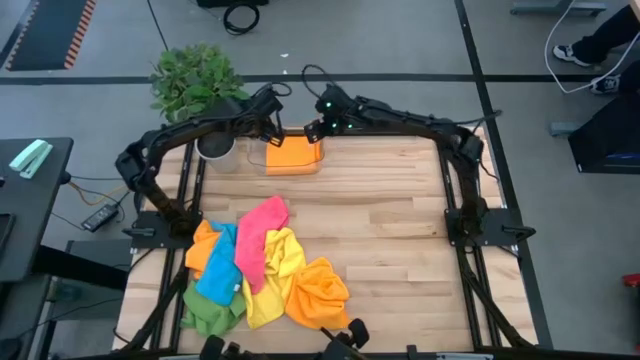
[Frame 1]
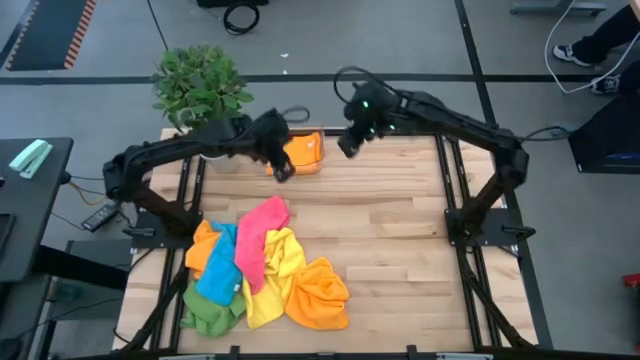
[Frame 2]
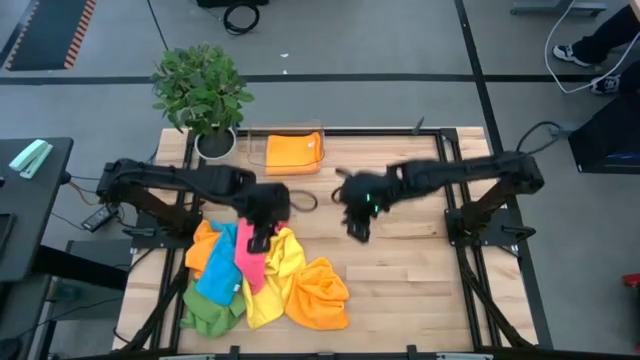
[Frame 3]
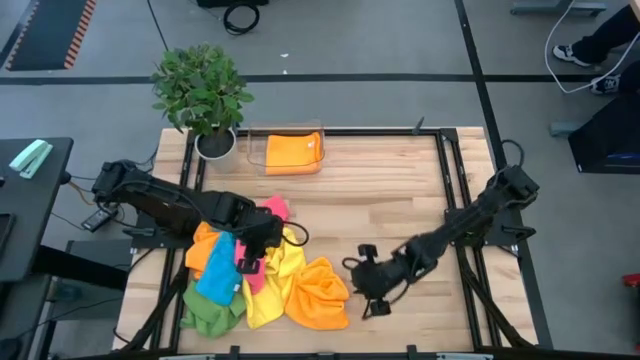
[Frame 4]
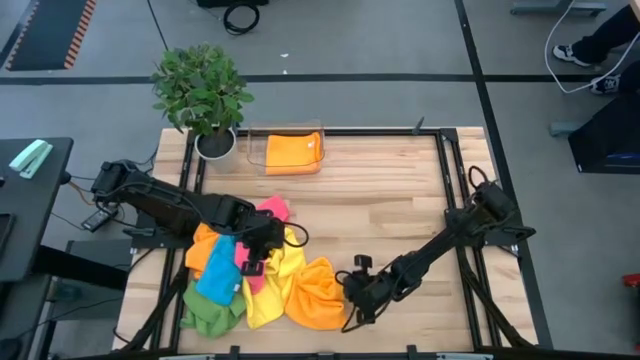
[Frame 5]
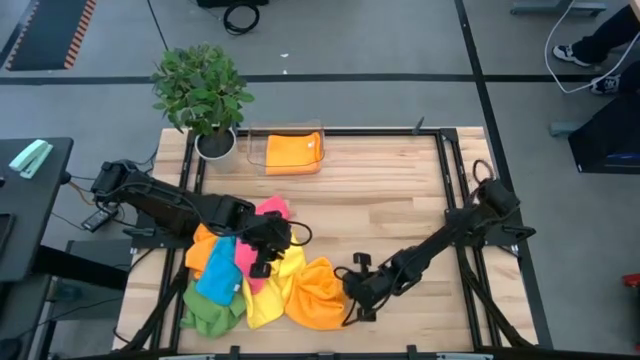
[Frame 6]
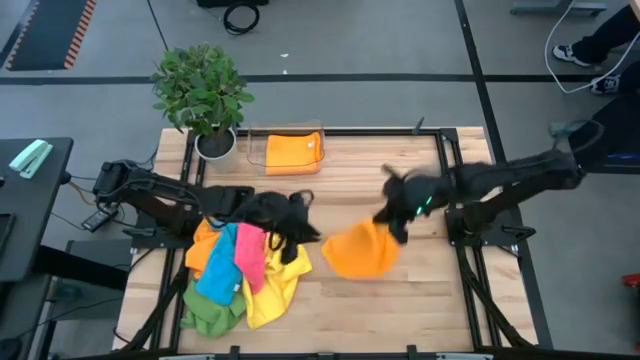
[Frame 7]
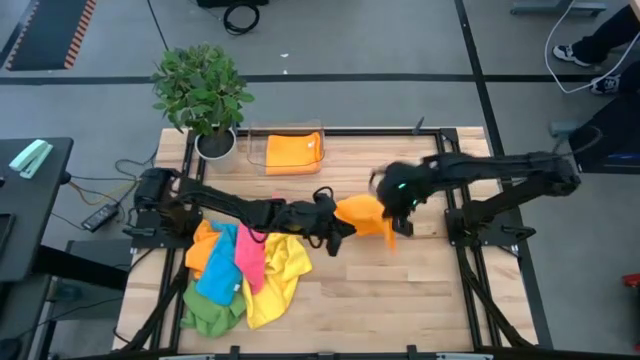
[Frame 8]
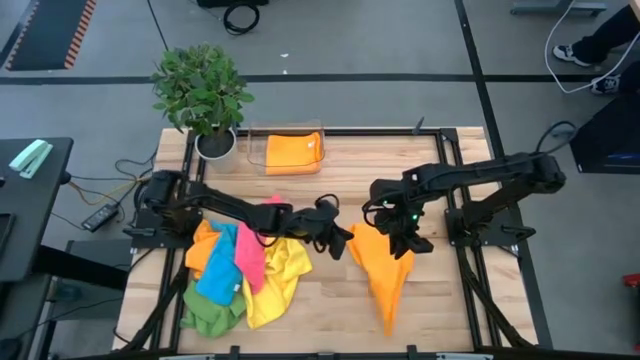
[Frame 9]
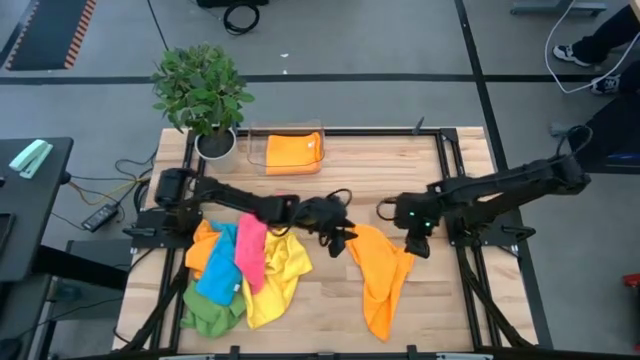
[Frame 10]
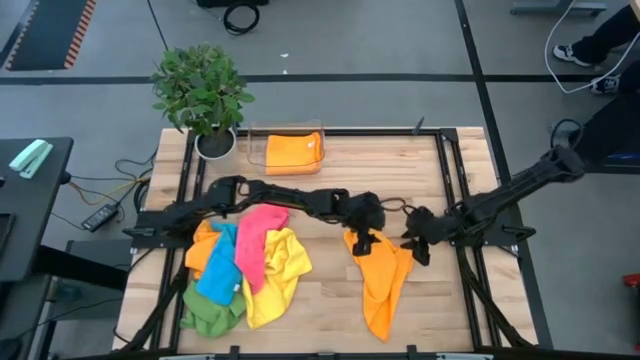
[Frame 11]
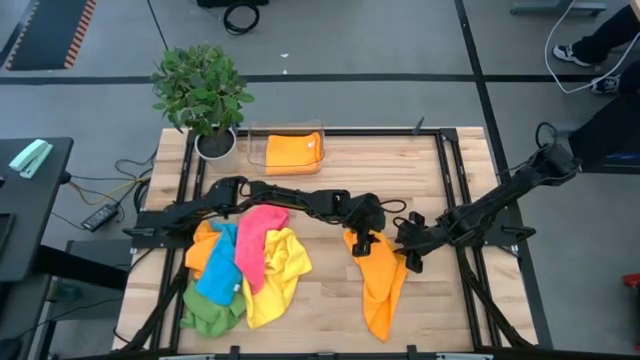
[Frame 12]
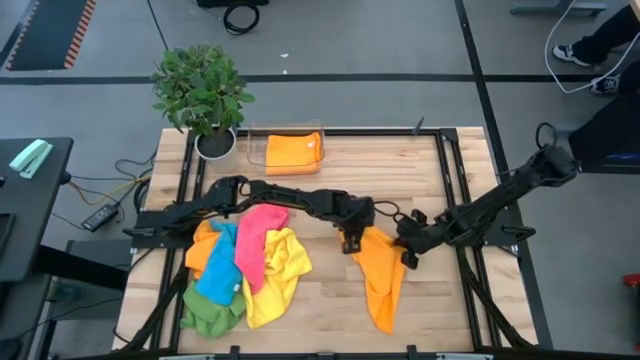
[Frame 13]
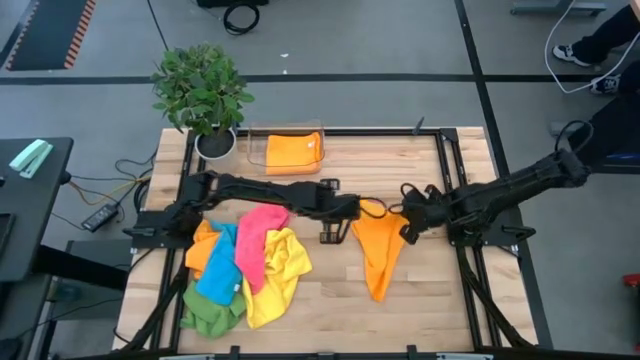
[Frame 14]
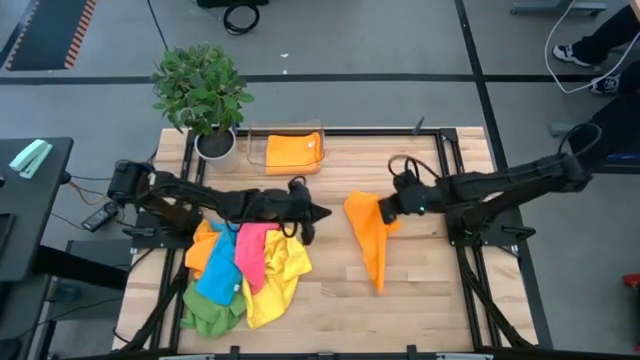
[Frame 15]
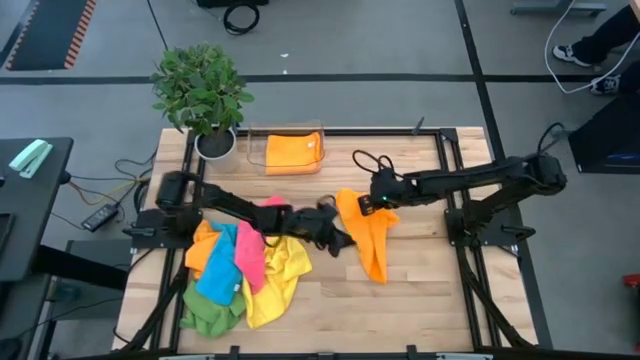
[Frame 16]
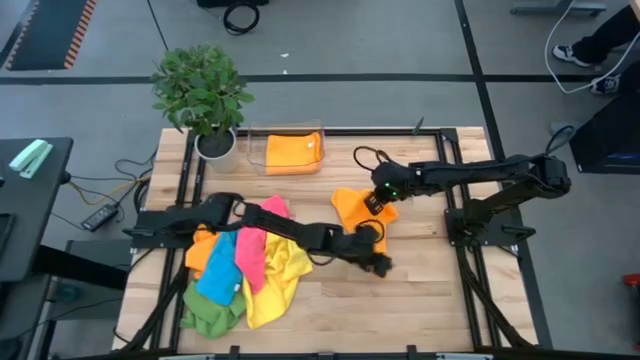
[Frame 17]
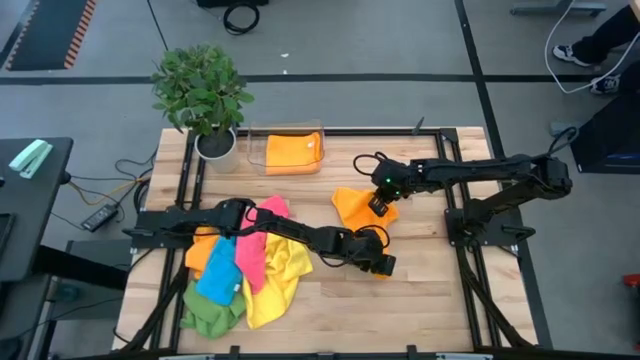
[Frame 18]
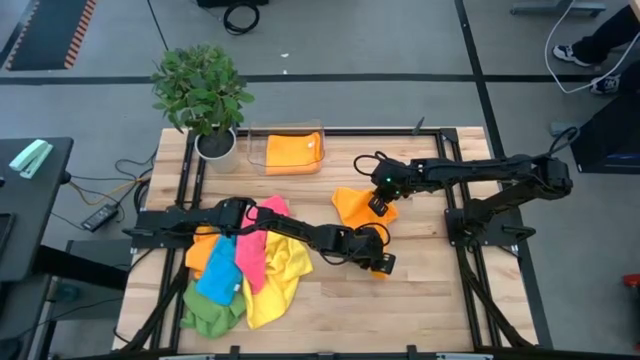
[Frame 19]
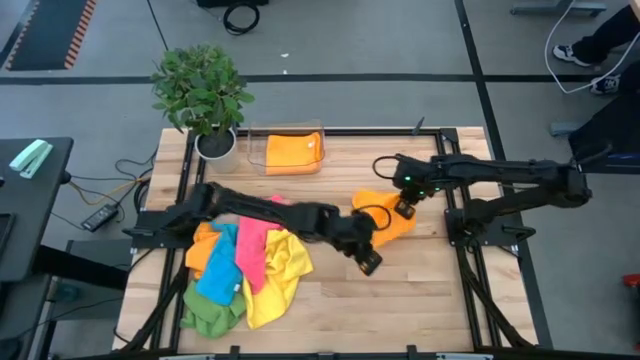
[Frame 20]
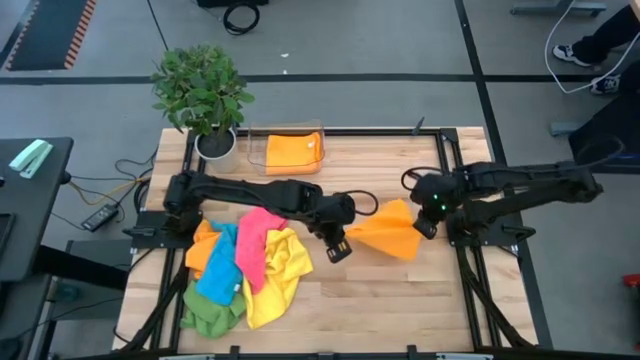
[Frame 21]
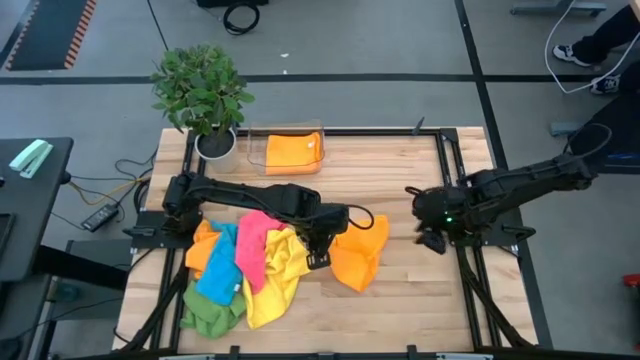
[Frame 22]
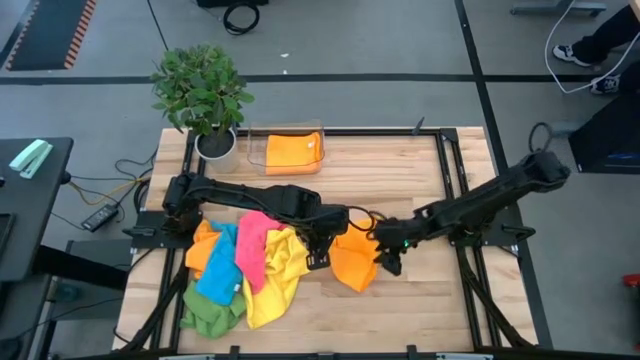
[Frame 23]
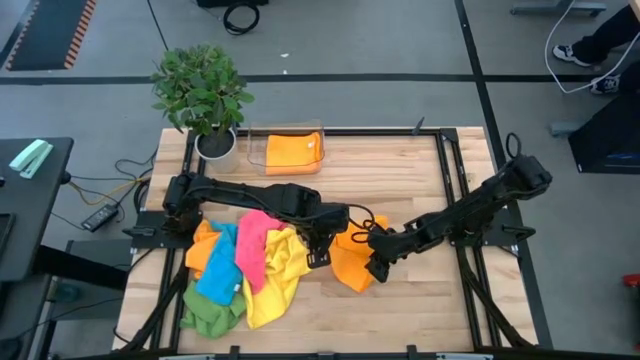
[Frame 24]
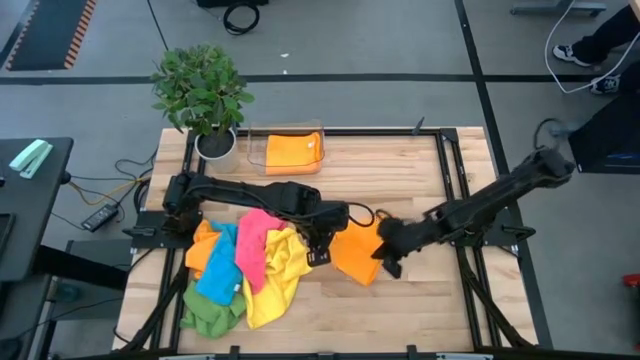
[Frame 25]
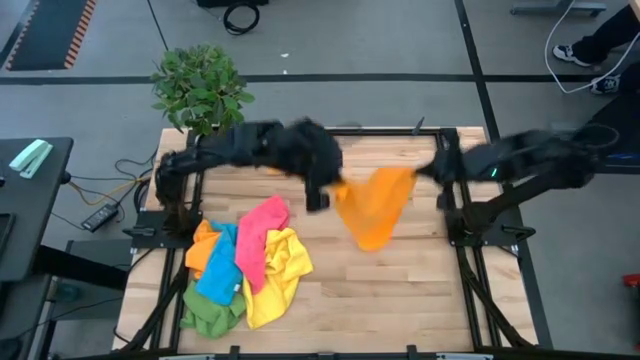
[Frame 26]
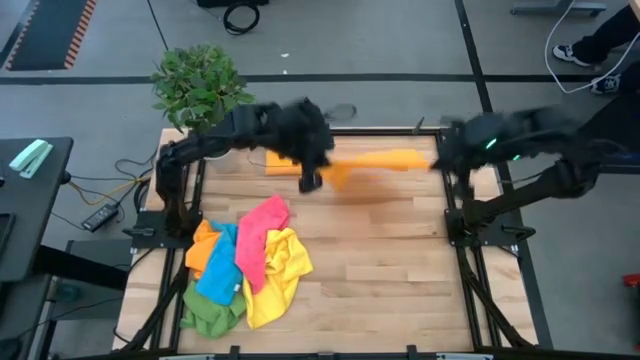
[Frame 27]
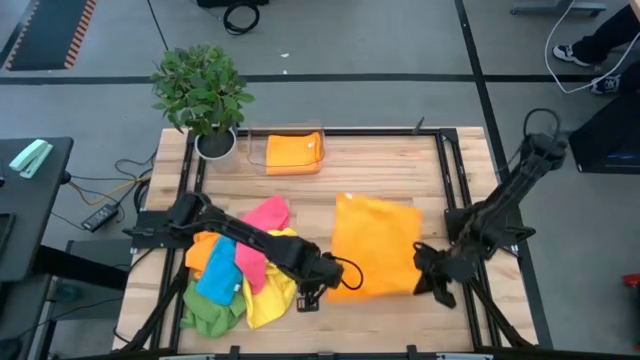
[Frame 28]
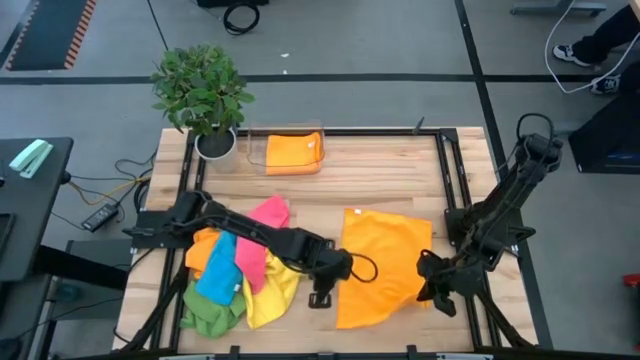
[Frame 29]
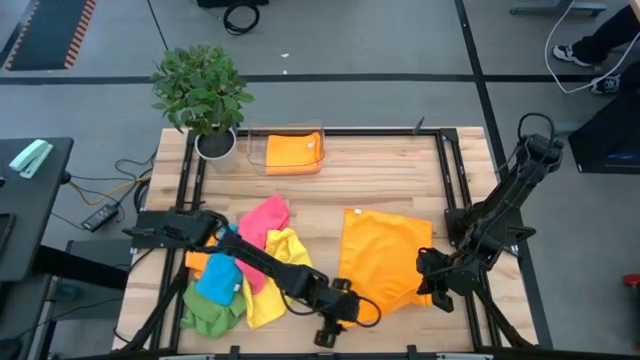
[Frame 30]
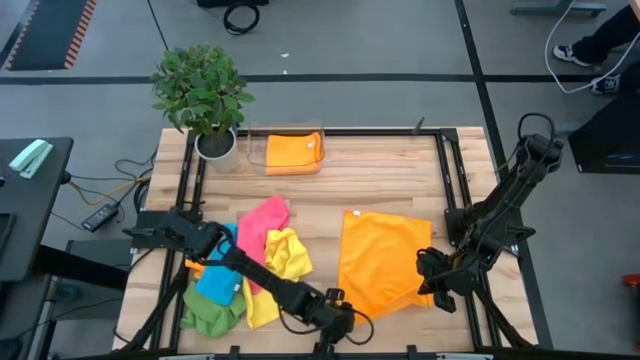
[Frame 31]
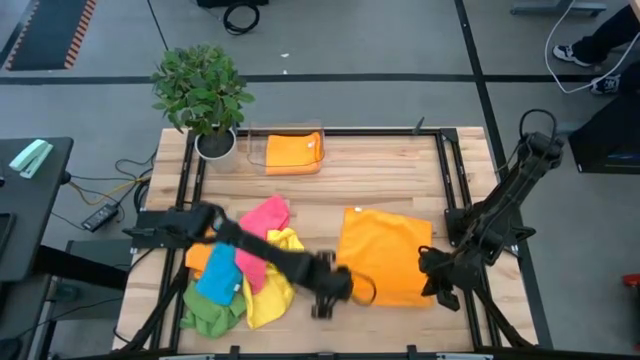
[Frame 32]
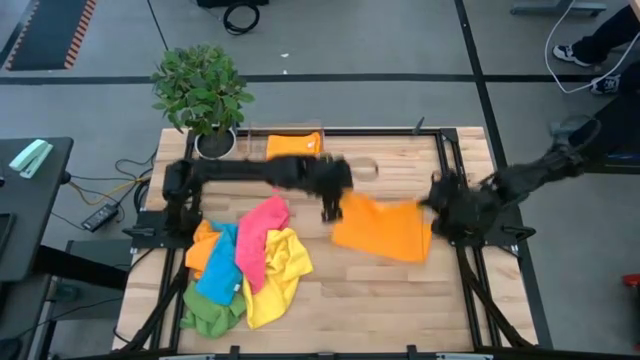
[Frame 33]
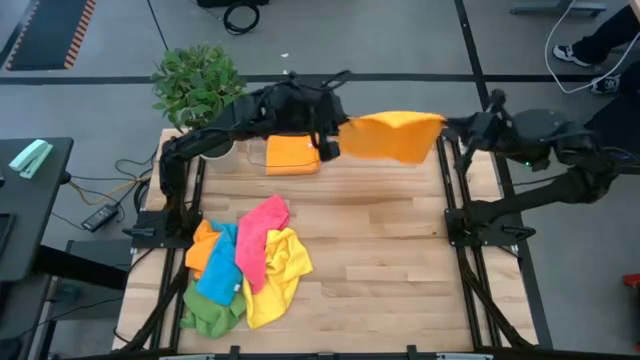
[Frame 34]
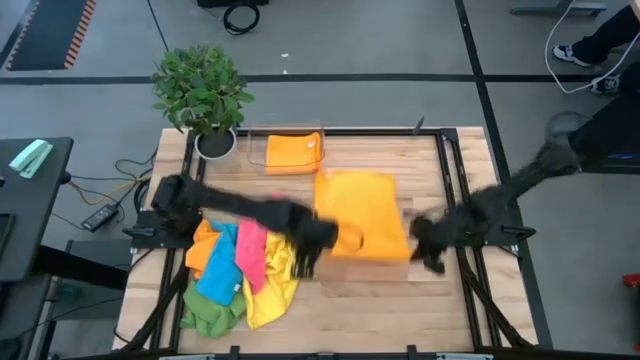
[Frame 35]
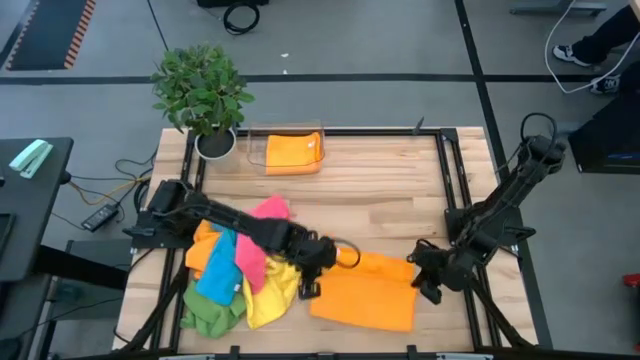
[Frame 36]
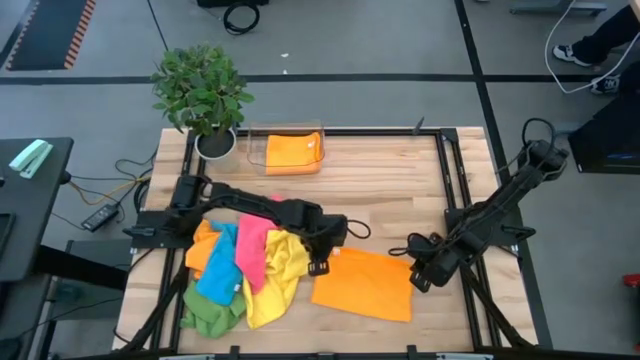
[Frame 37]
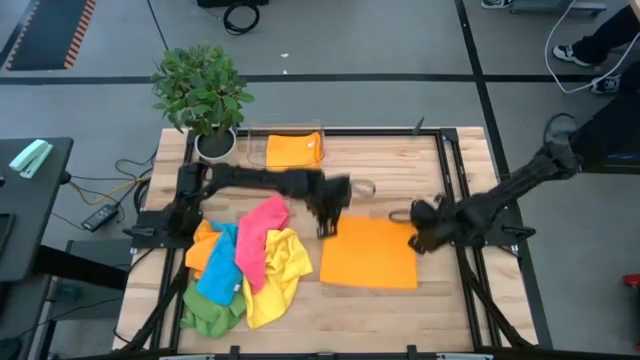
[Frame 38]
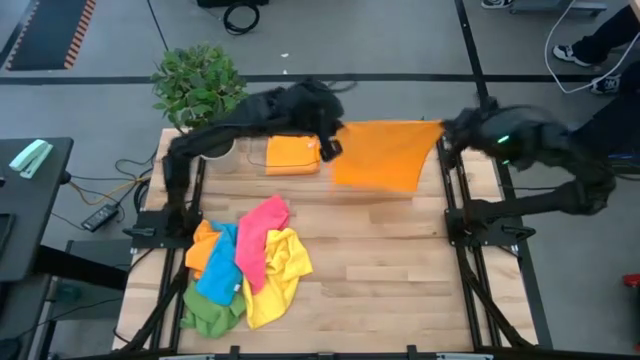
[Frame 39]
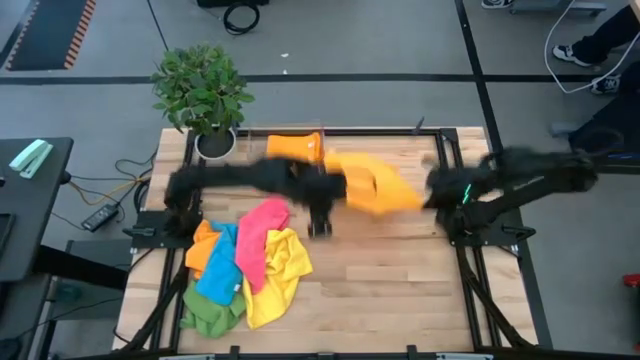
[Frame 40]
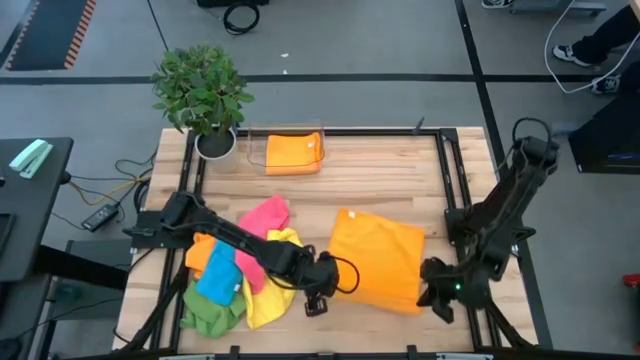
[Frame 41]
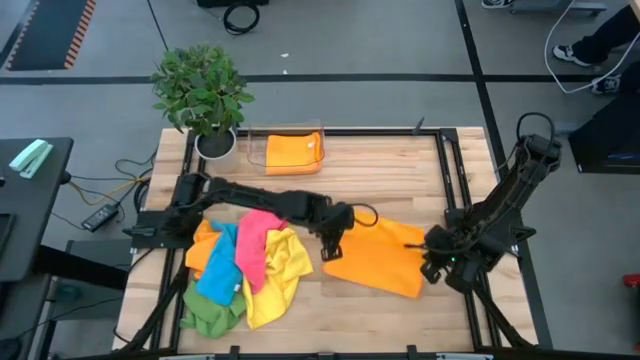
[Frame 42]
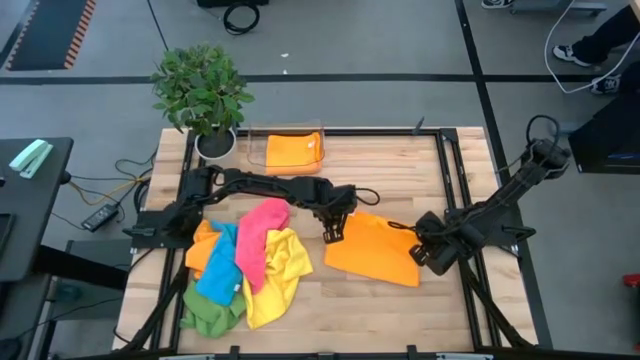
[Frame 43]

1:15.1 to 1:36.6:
Task: Fold microfiber towels
Fold the right orange microfiber cloth
